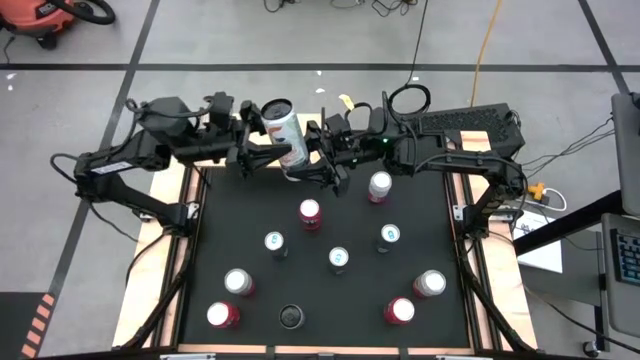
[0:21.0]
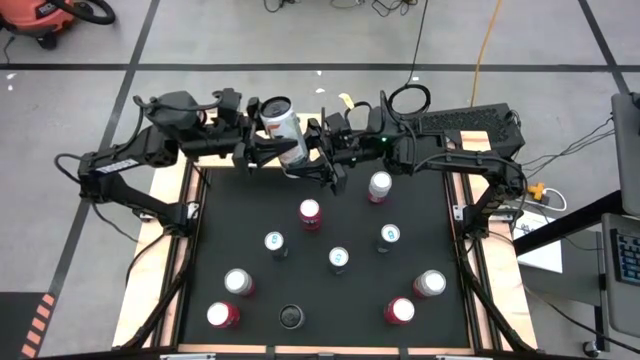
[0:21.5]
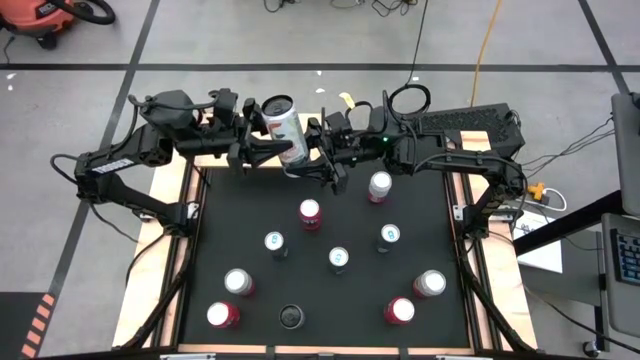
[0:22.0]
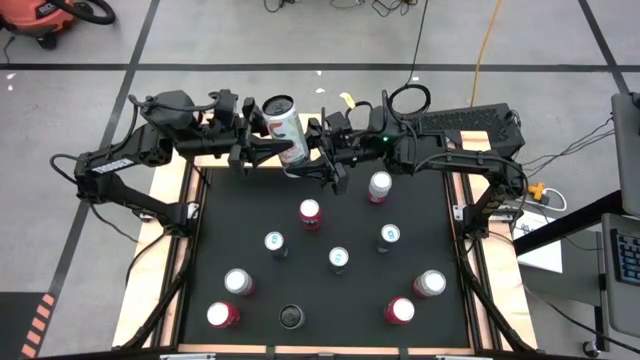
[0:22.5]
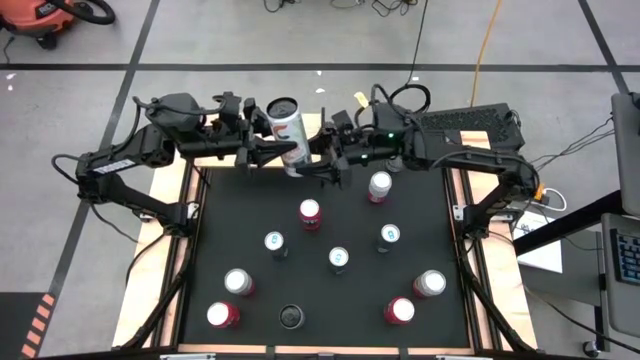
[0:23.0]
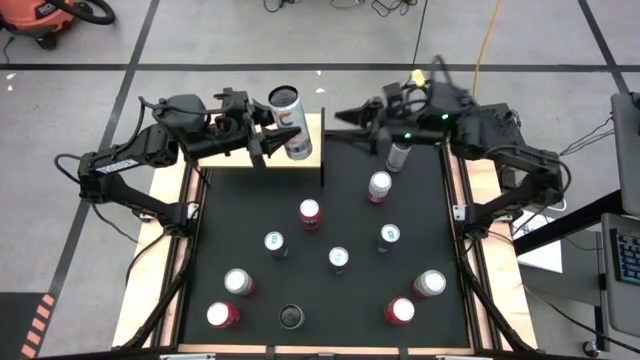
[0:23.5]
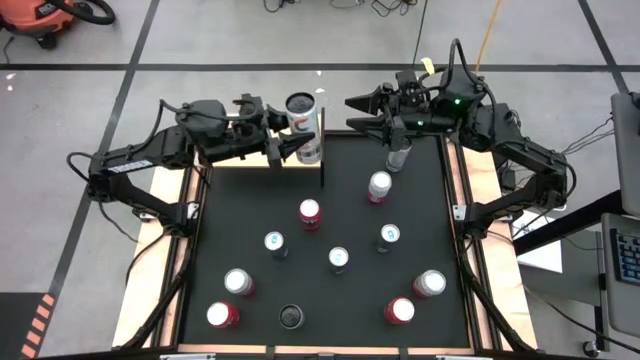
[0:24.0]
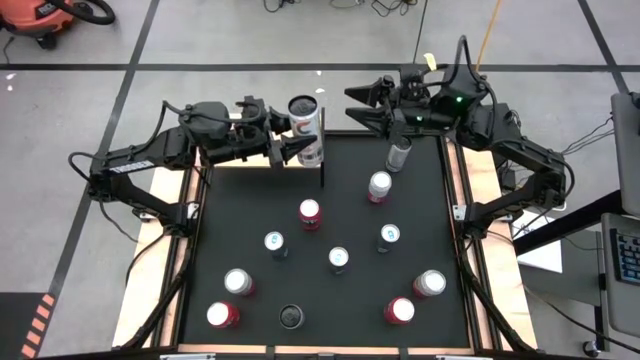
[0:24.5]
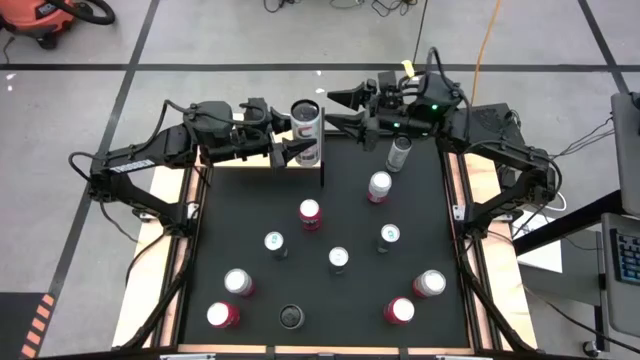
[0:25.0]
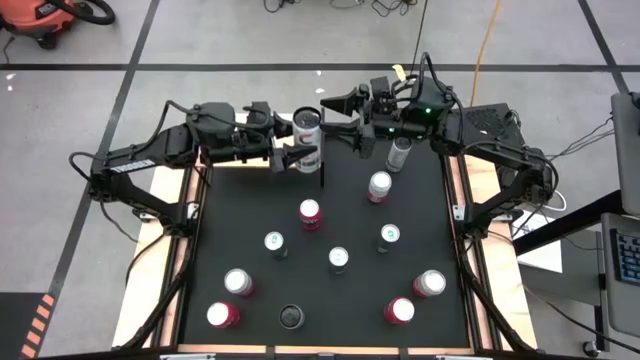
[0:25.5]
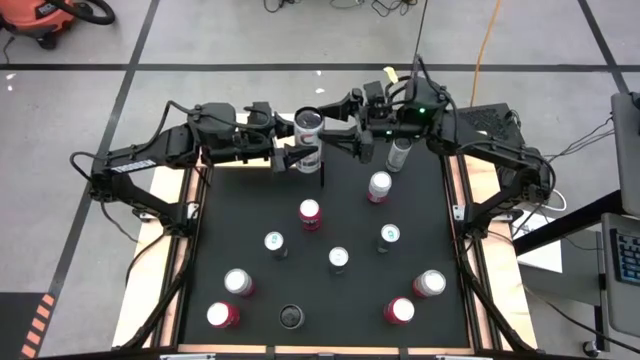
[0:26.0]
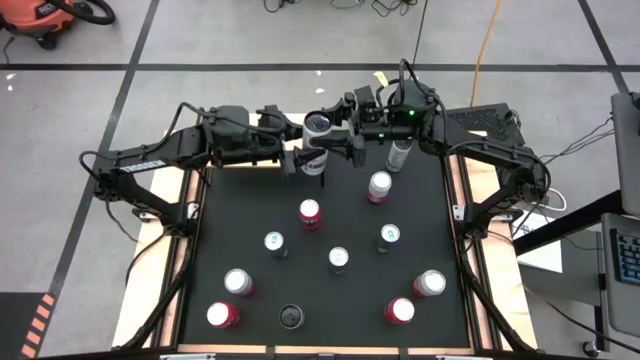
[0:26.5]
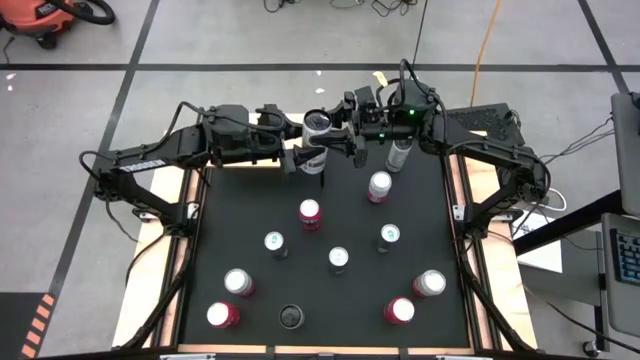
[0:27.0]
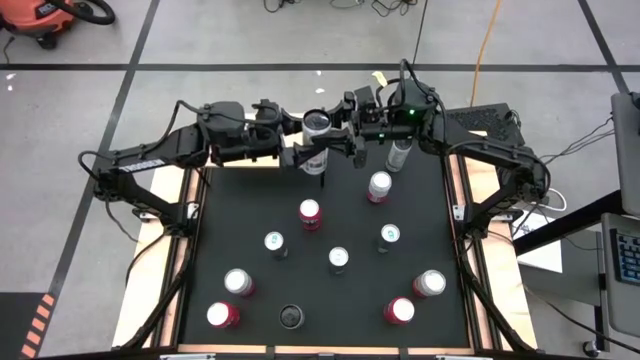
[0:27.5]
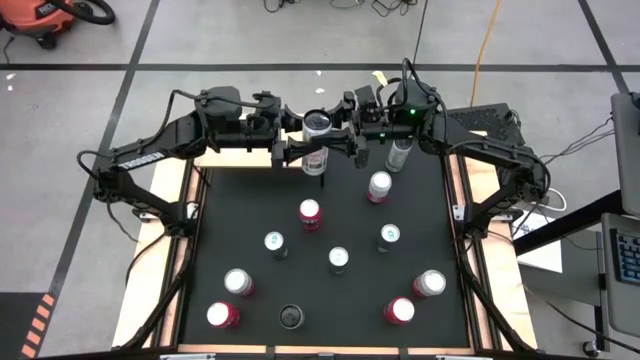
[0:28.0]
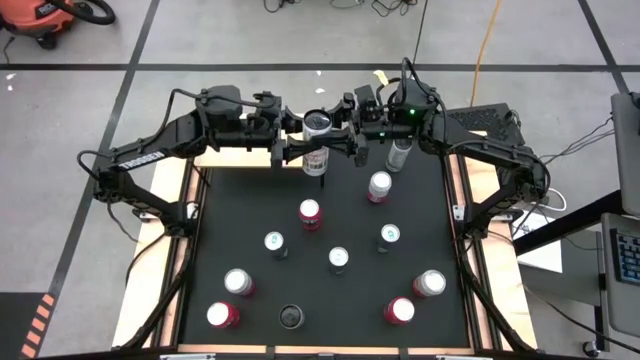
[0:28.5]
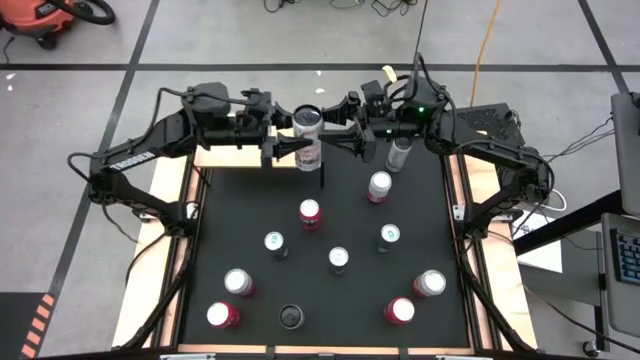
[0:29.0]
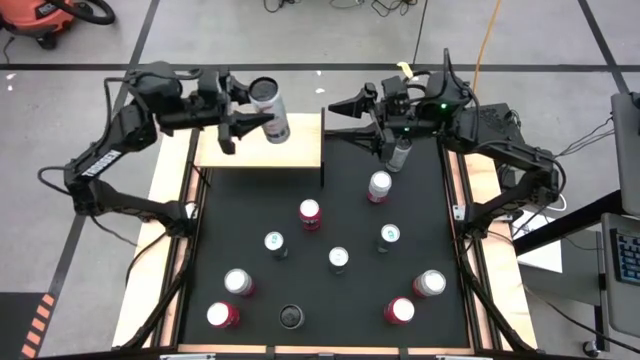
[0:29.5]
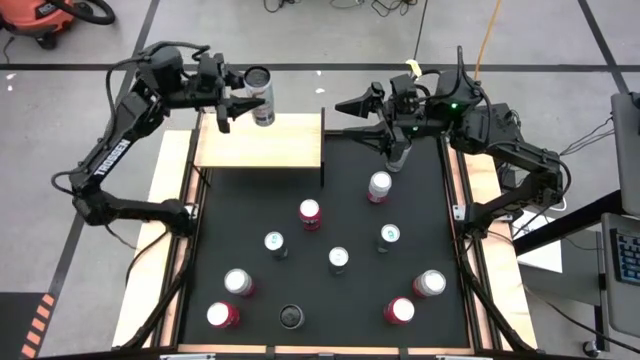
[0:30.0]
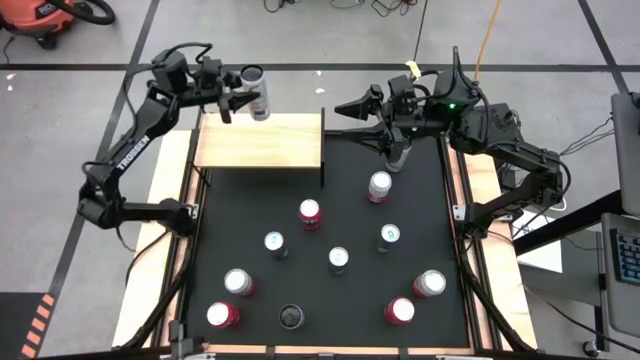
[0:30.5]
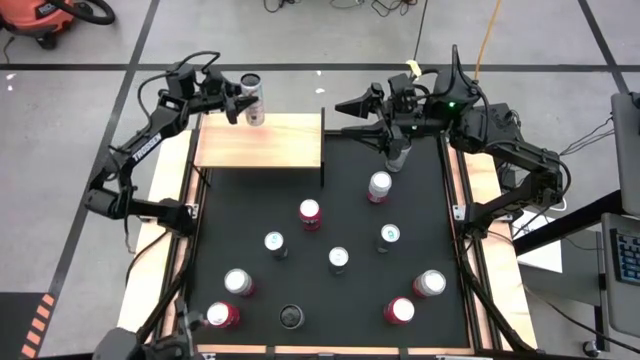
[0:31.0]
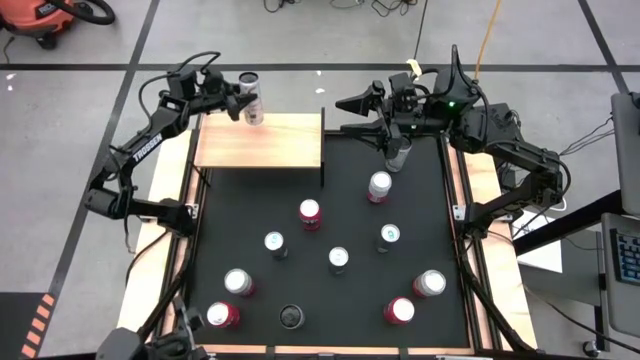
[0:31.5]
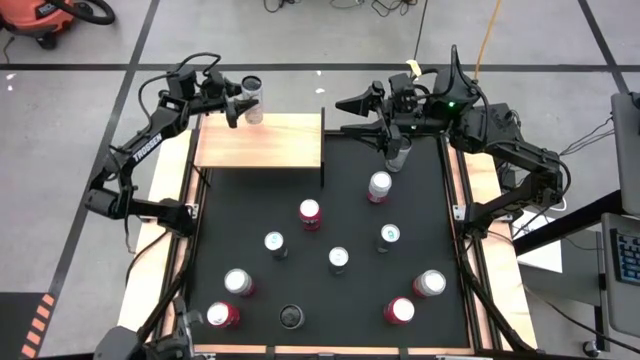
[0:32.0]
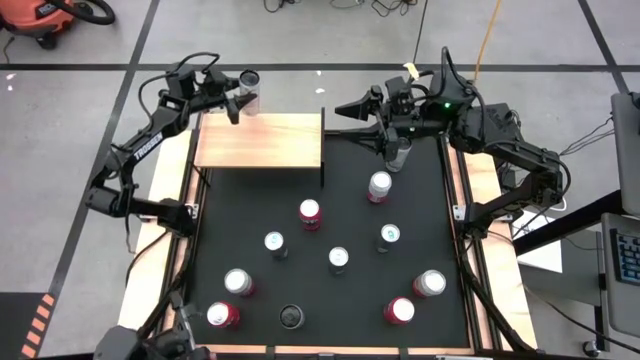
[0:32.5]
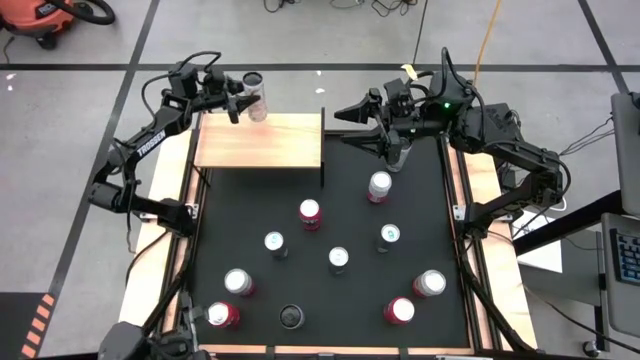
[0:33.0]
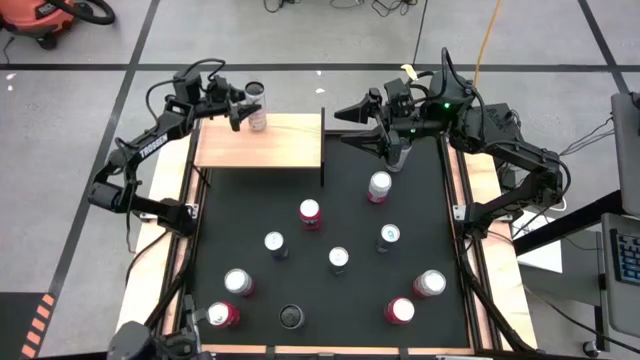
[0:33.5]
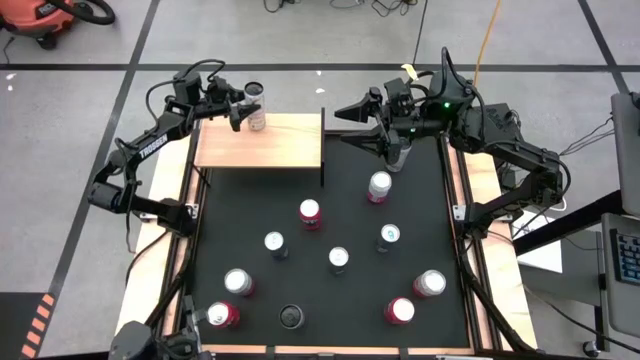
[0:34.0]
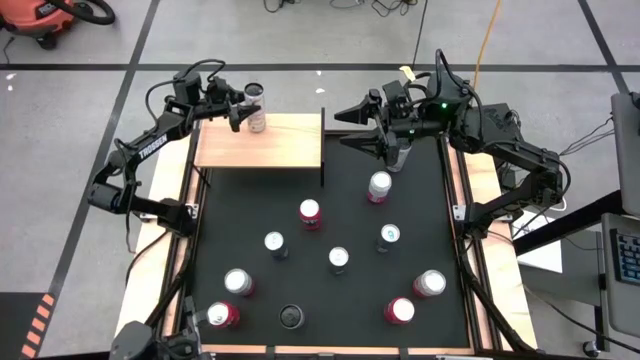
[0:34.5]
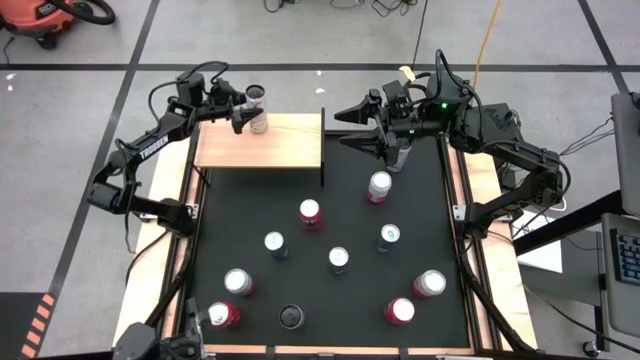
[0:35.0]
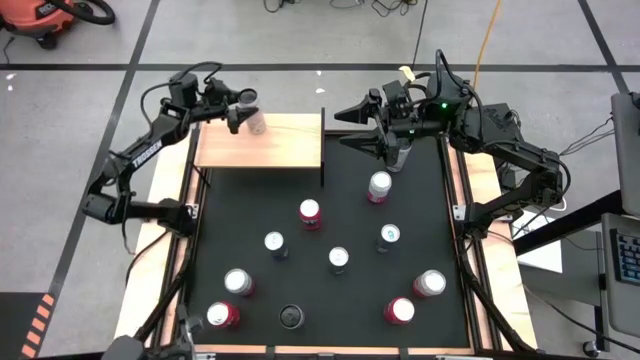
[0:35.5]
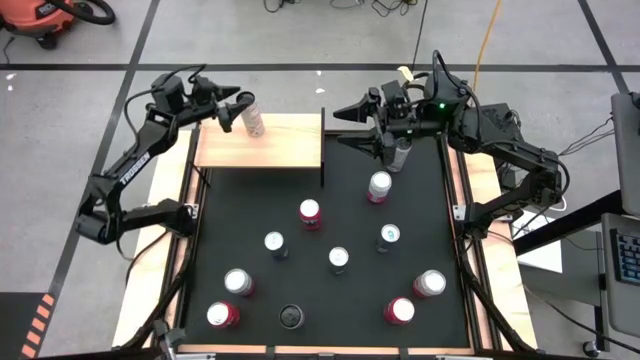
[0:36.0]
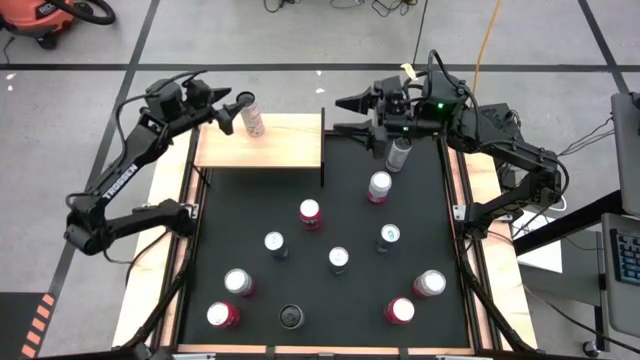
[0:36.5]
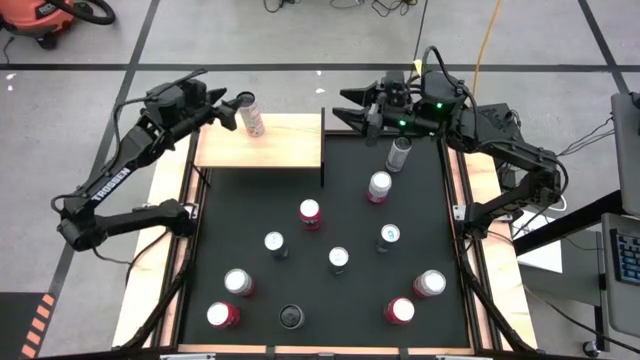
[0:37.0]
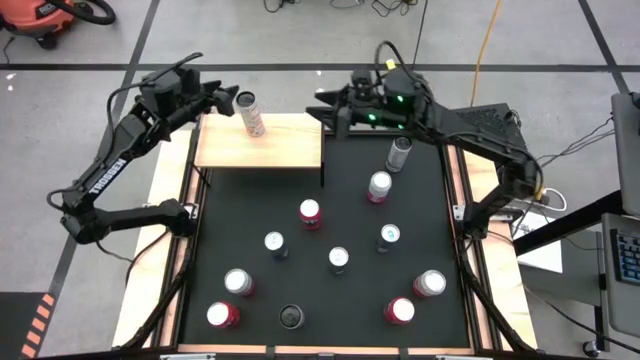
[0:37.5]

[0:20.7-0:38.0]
Task: Place canned beverage on shelf
Put the middle white yellow soda can on the shelf

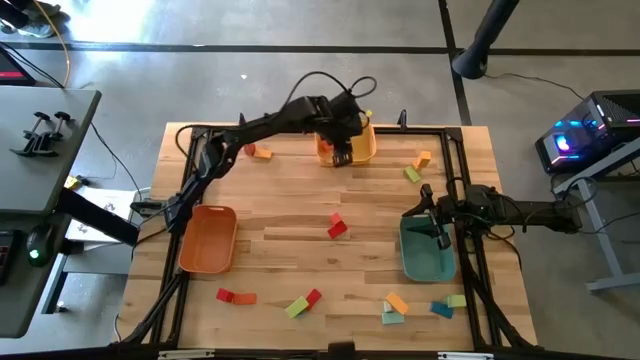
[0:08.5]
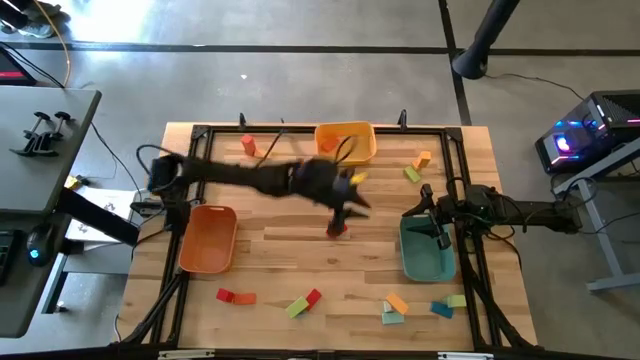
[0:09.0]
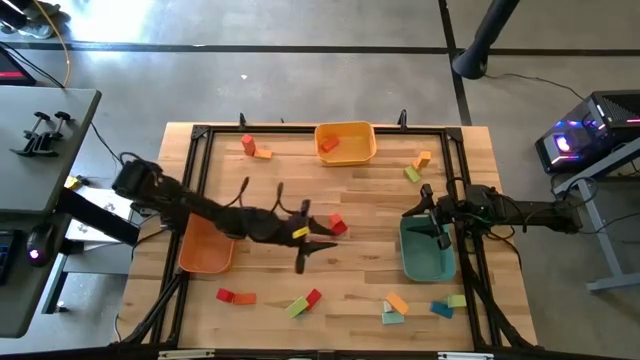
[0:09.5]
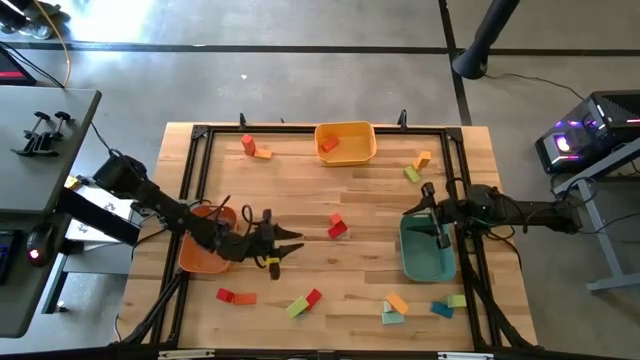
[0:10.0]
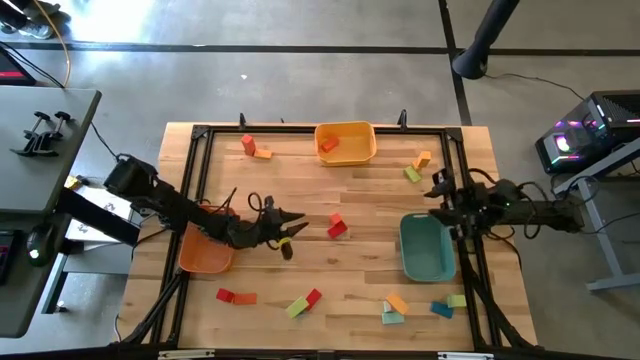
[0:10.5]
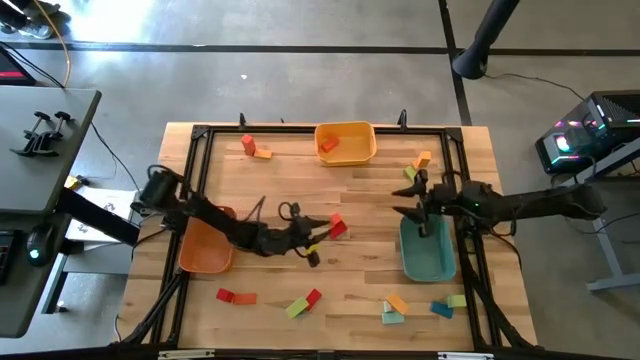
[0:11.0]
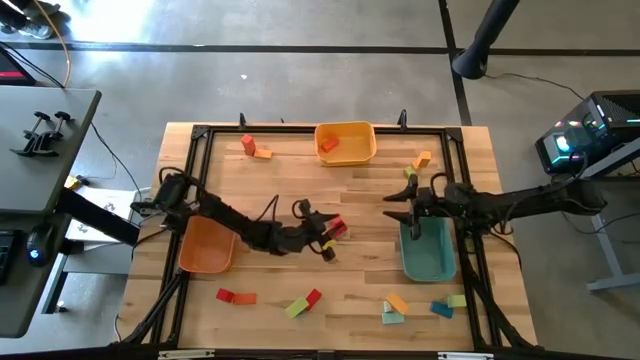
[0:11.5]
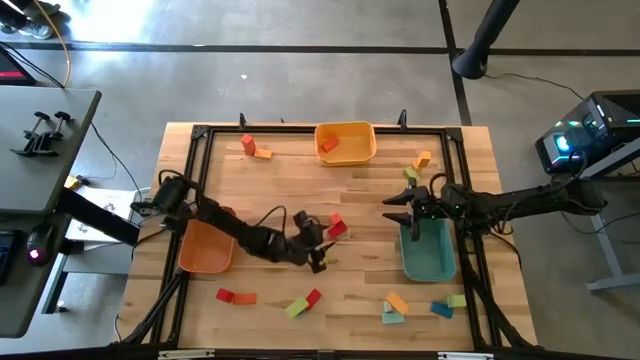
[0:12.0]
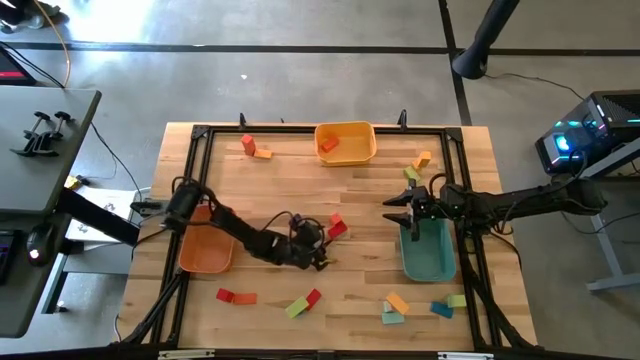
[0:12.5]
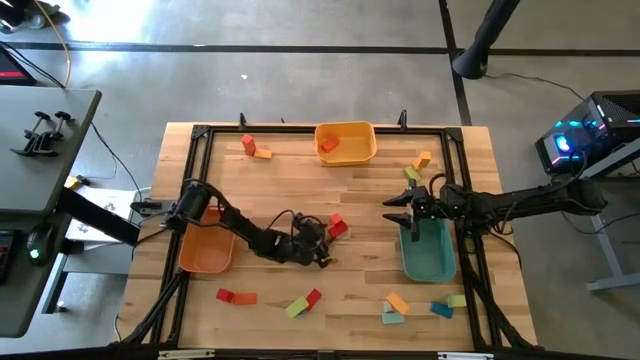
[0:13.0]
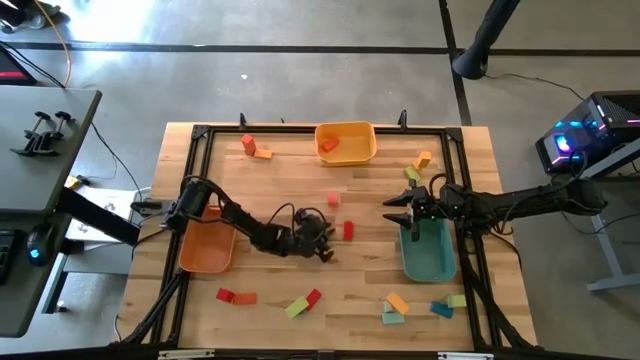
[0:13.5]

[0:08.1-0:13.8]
Task: Sort blocks by size
Put the red medium block into the orange bin
